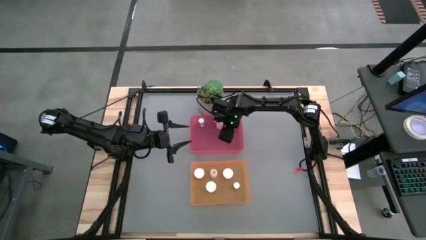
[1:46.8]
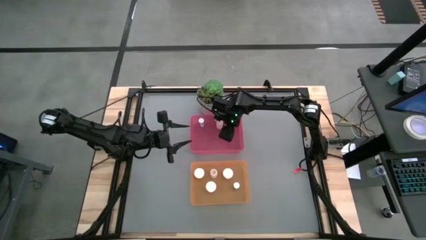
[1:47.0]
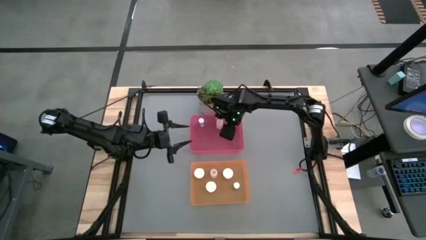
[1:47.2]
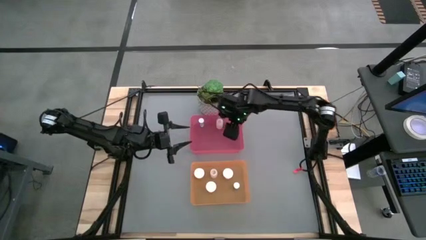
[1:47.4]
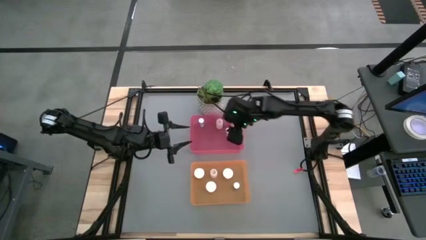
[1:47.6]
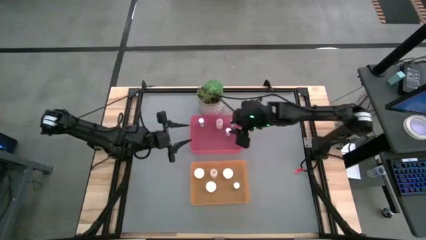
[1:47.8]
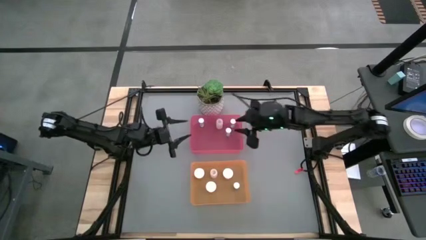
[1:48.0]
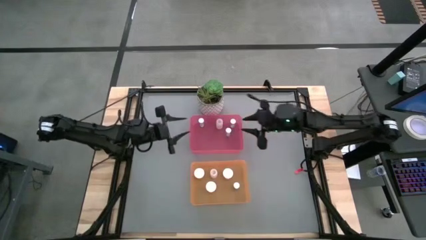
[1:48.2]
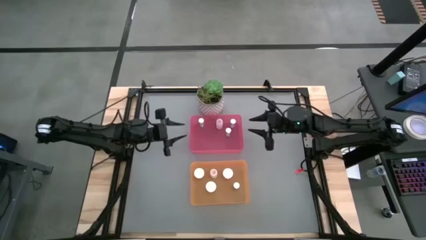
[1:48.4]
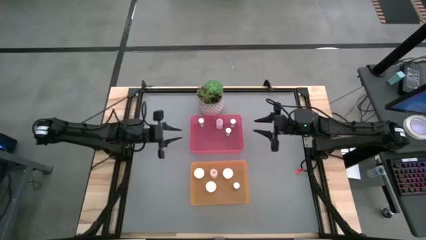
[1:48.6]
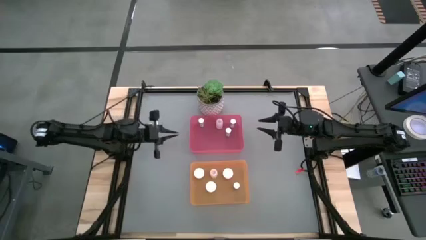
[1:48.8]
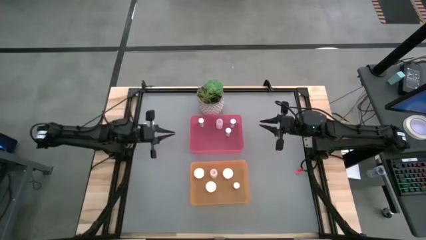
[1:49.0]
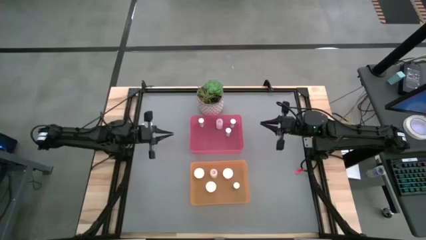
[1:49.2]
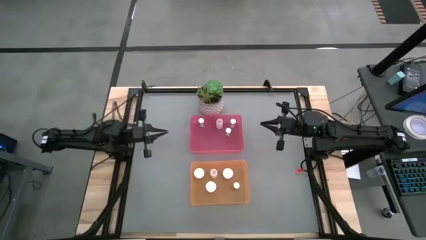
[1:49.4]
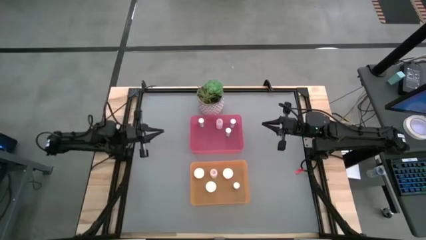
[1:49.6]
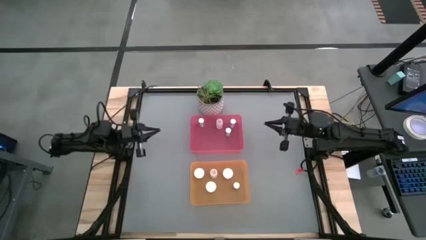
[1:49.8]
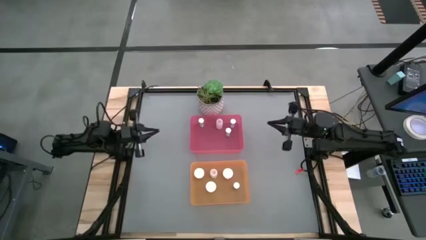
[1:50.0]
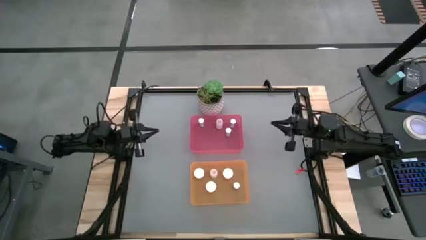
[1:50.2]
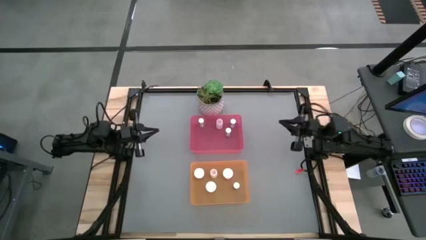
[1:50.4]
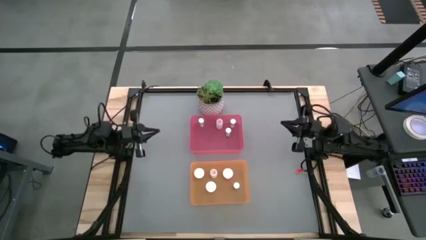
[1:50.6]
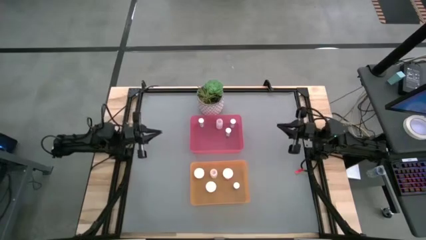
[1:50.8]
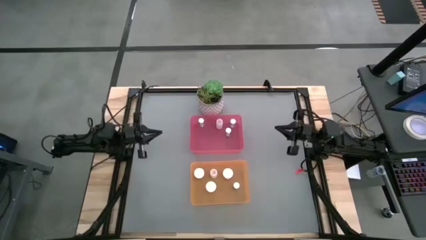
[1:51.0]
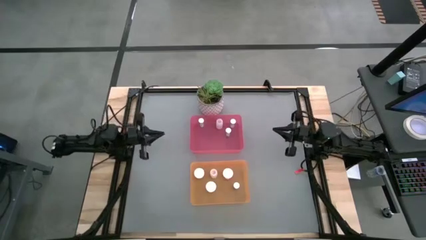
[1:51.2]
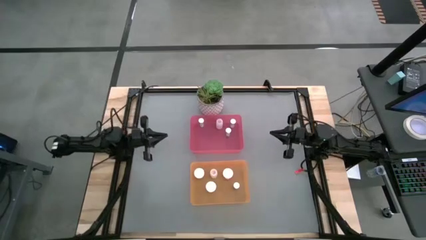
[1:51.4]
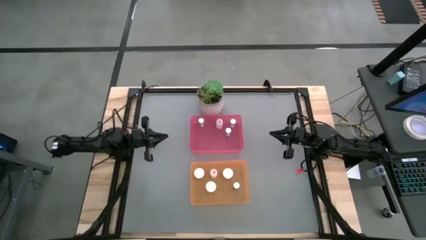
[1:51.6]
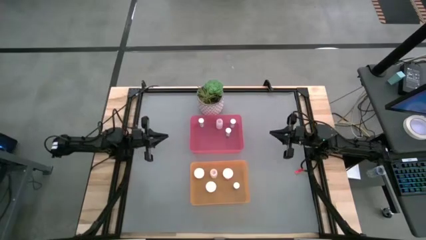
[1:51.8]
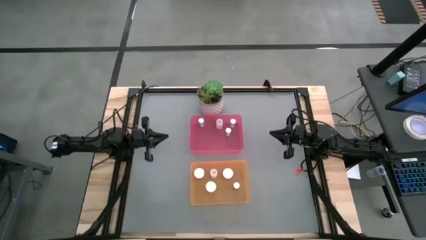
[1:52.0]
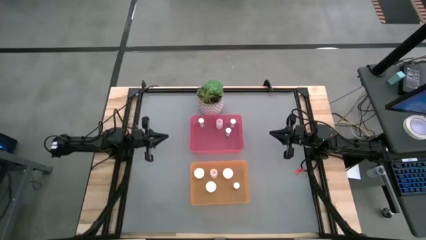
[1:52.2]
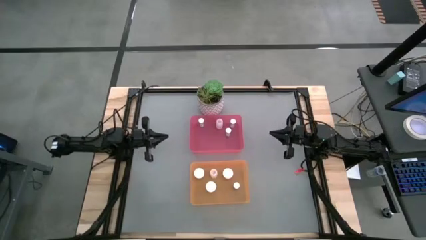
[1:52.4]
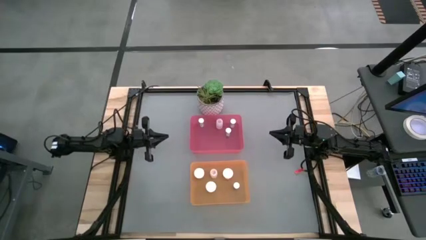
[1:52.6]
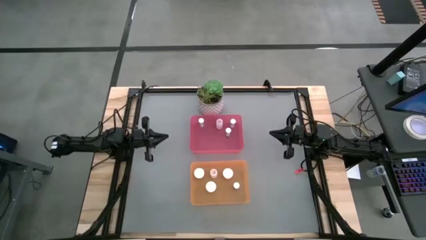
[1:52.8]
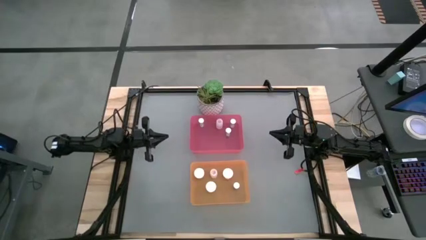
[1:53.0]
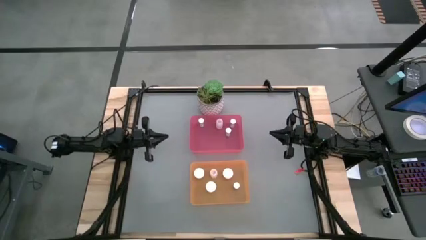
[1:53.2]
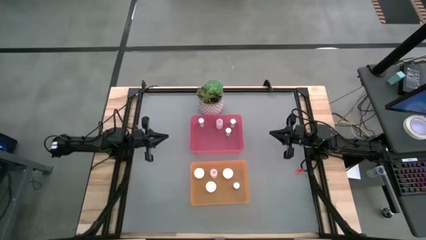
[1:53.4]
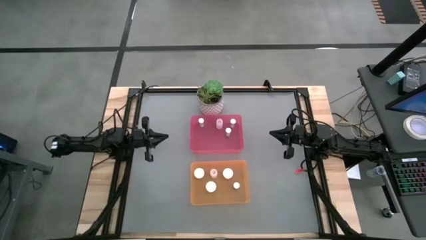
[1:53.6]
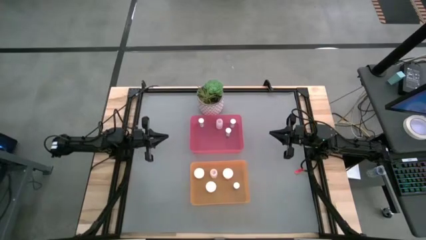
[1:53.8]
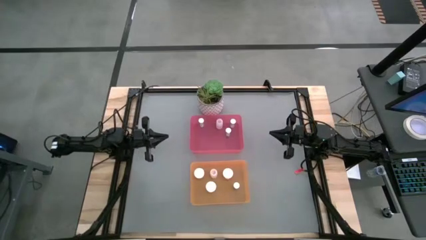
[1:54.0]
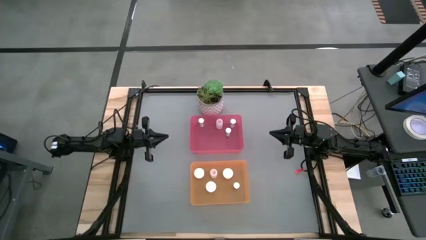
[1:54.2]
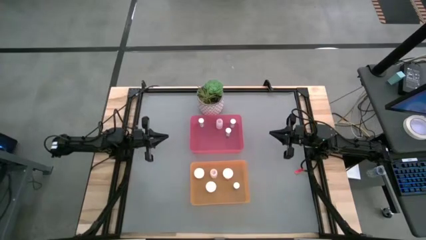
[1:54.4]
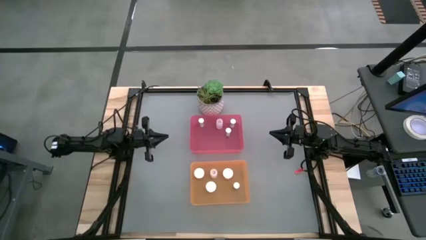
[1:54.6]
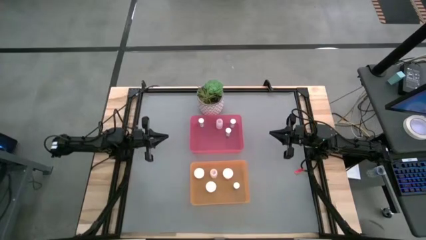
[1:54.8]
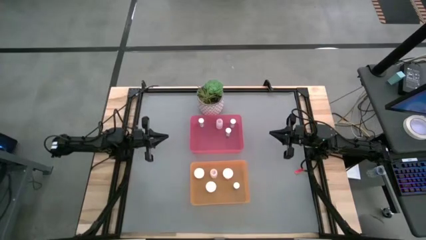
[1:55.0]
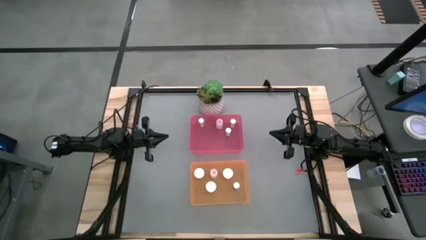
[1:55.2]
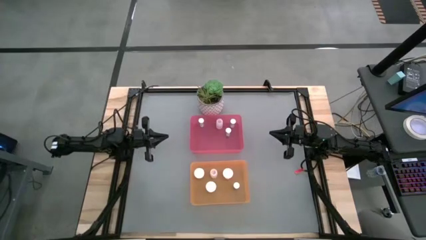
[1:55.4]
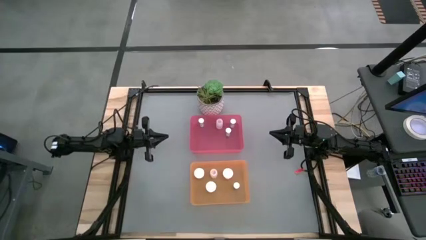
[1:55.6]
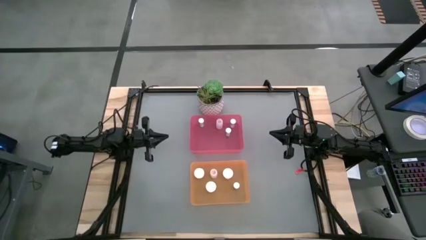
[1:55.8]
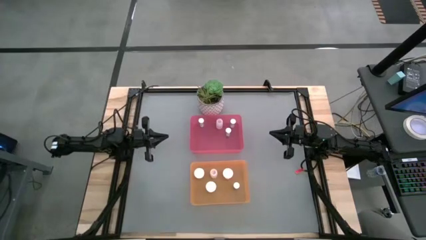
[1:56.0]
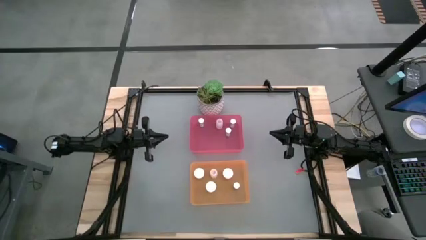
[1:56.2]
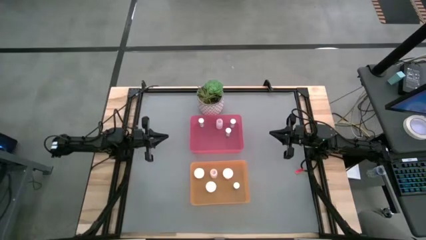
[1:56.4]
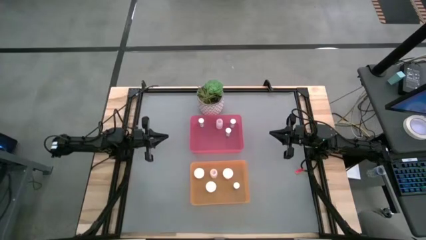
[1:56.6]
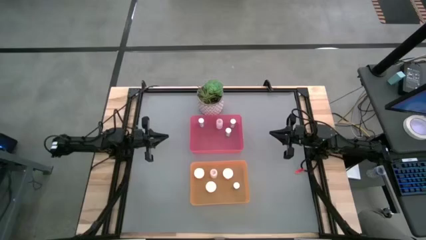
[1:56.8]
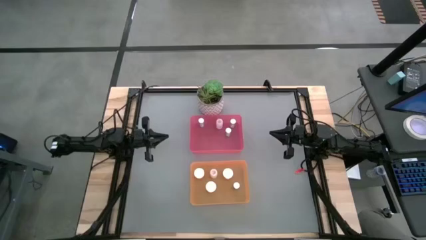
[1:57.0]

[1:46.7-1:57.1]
Task: Pick and place medicine bottles into bin by pill shape (circle, oval)
Return to Home Position

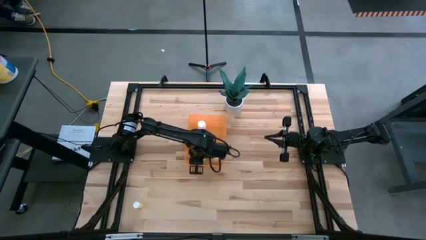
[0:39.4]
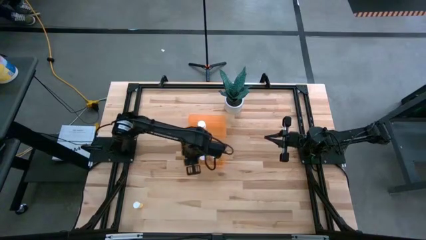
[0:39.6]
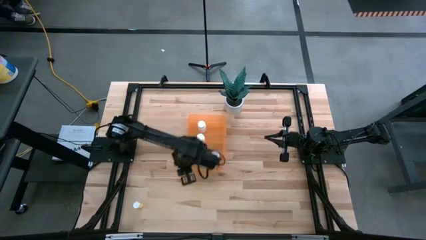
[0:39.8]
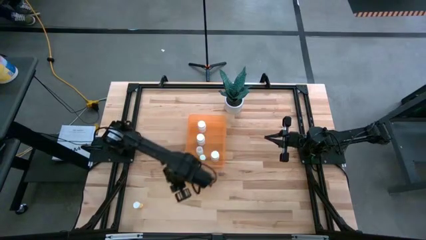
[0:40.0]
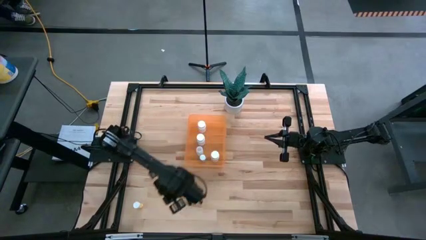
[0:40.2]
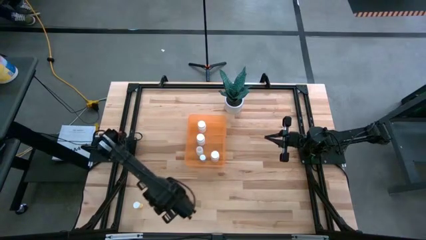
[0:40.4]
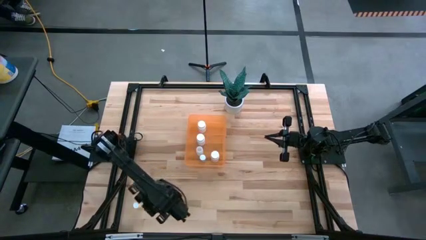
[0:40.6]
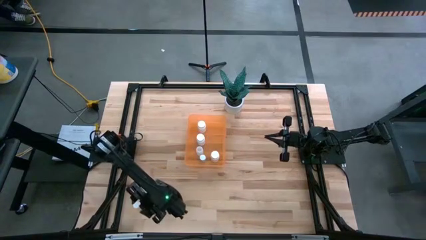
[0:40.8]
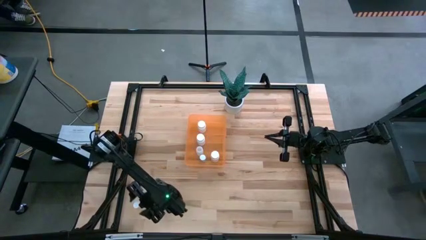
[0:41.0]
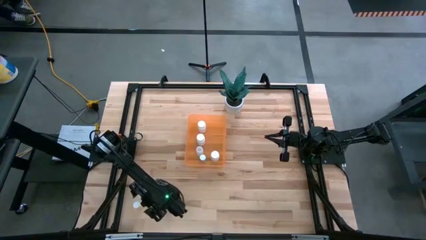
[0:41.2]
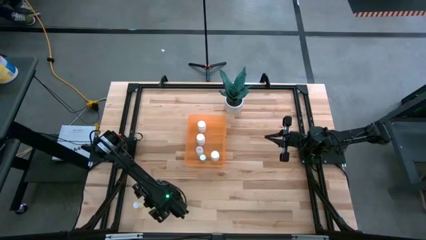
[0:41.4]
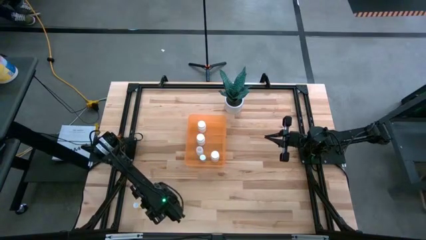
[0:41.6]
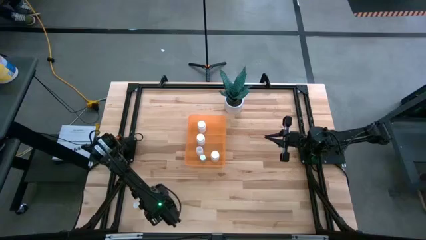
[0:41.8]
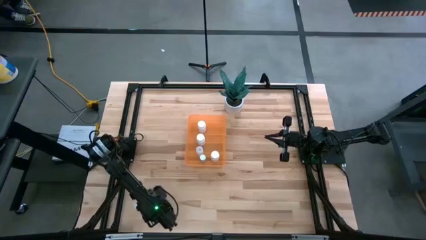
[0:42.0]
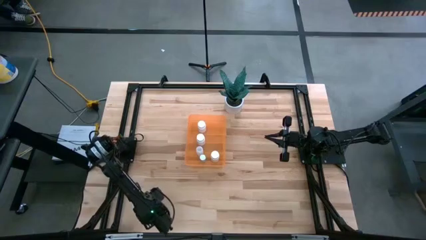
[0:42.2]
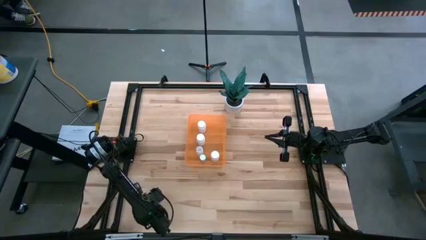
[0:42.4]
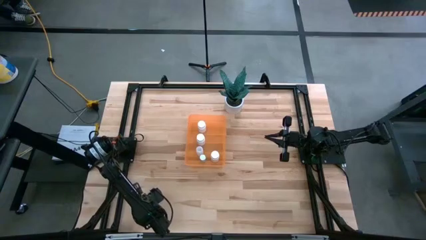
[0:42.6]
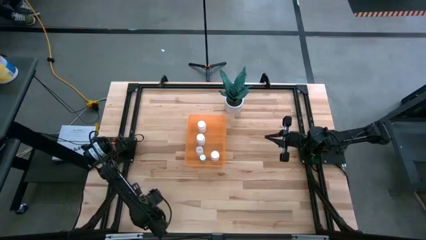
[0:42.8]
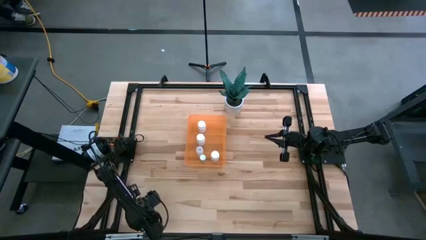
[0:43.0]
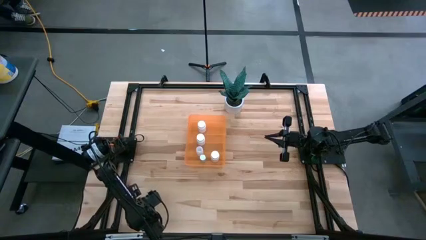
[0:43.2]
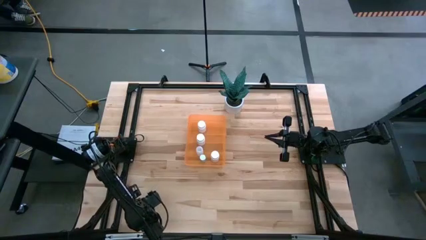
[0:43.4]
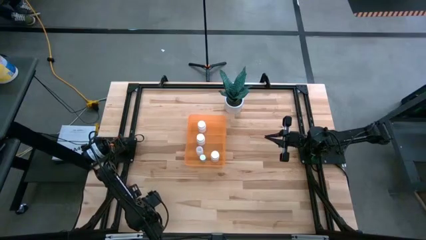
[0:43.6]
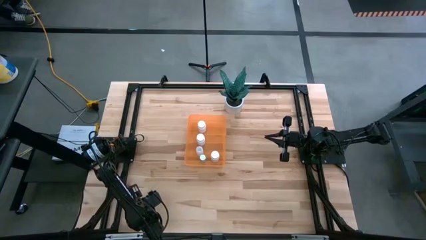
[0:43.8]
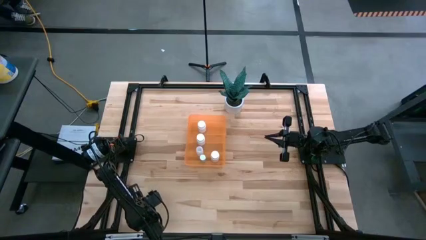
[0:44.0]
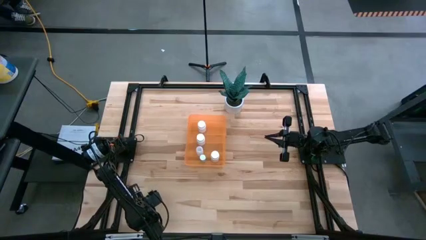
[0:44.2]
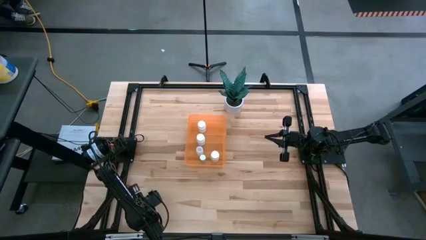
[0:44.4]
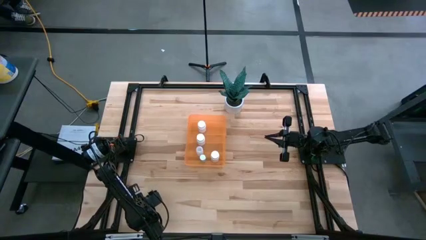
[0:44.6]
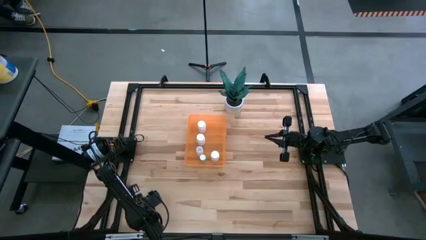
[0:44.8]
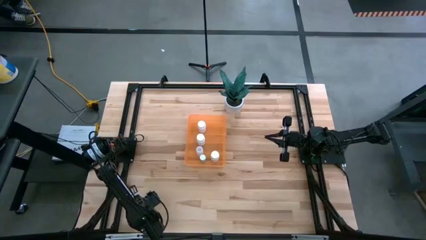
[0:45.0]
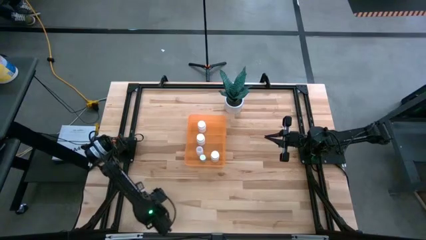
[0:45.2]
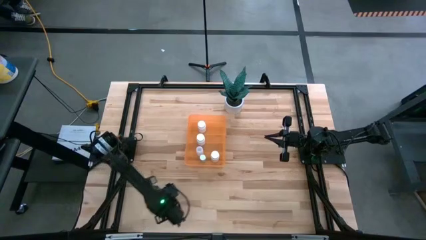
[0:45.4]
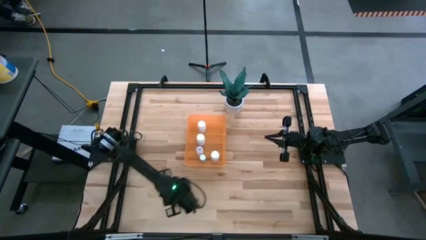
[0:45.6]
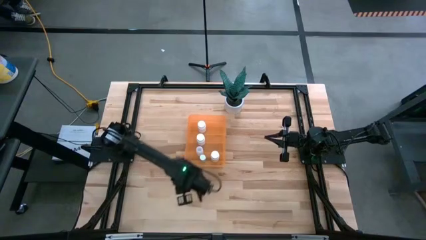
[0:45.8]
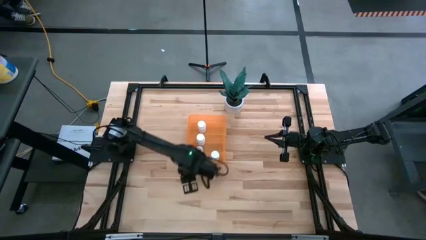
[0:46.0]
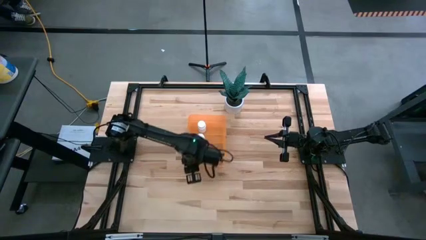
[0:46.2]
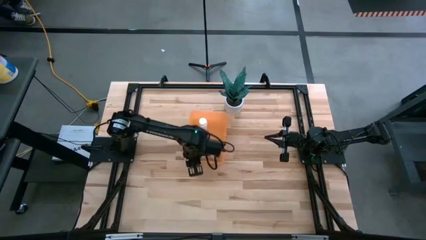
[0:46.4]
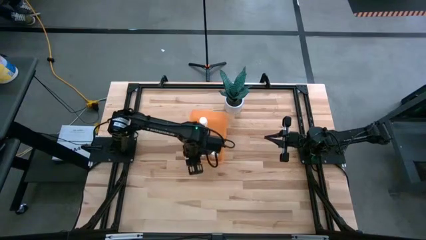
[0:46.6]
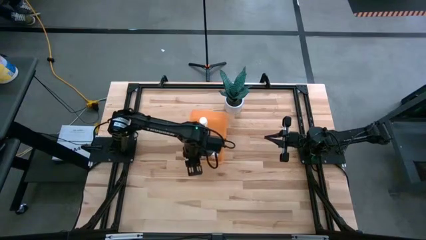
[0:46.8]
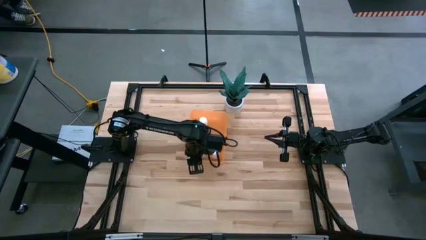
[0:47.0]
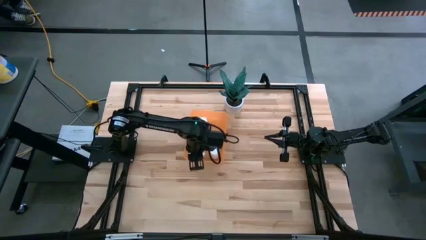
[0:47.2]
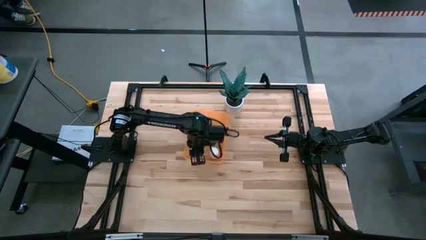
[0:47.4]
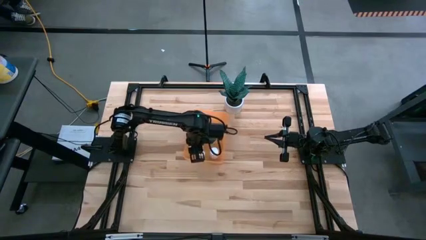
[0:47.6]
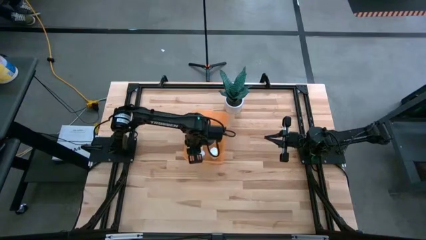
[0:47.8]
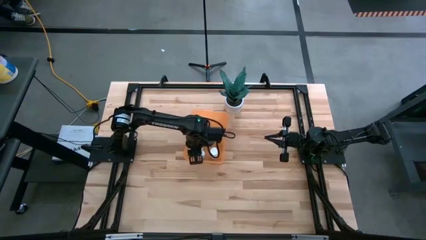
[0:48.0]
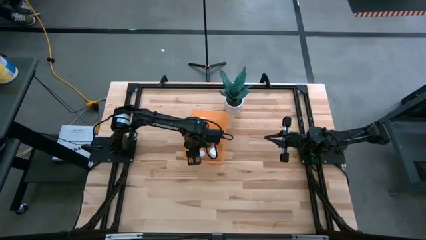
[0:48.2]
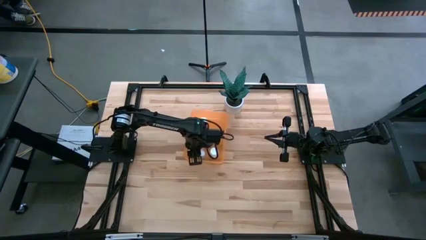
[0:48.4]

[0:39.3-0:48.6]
Task: Pick and place pill bottles into a basket
Put the orange pill bottle into the orange container
